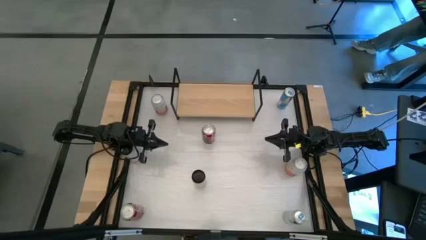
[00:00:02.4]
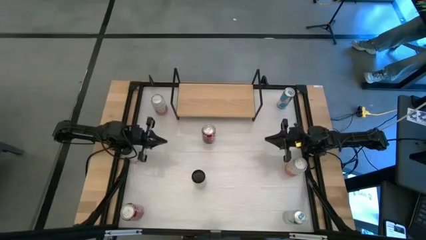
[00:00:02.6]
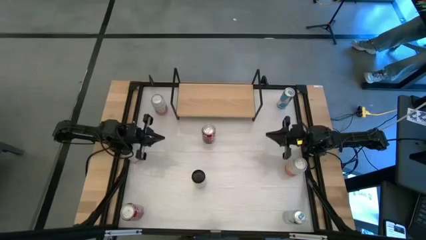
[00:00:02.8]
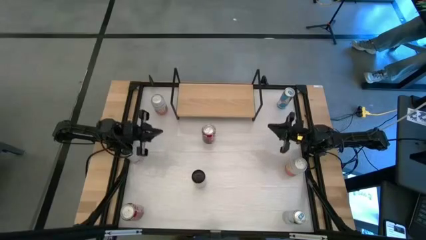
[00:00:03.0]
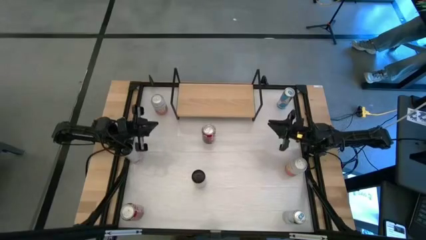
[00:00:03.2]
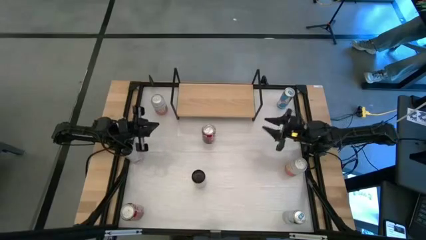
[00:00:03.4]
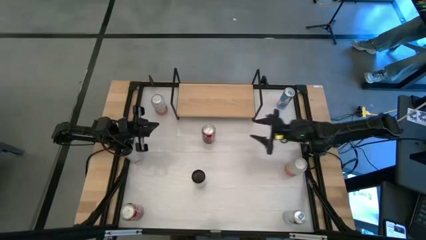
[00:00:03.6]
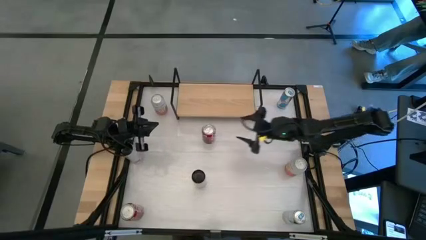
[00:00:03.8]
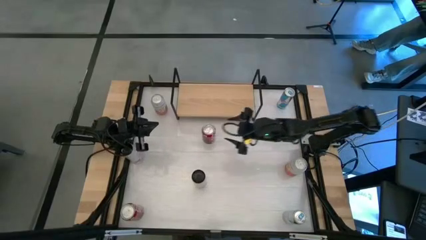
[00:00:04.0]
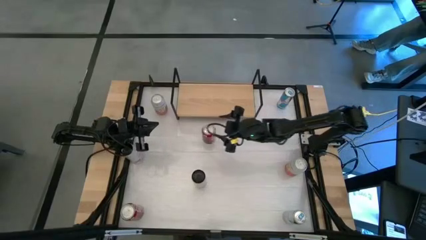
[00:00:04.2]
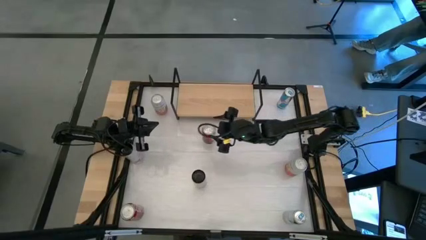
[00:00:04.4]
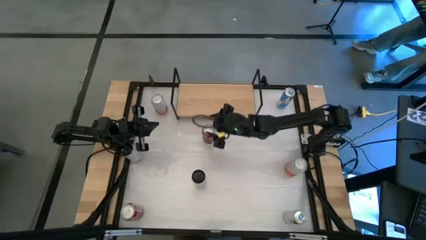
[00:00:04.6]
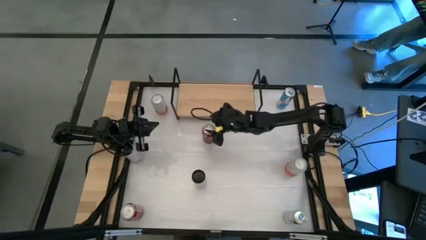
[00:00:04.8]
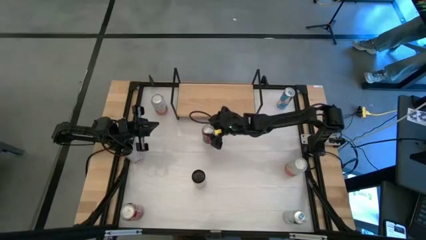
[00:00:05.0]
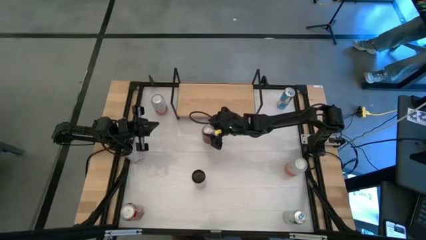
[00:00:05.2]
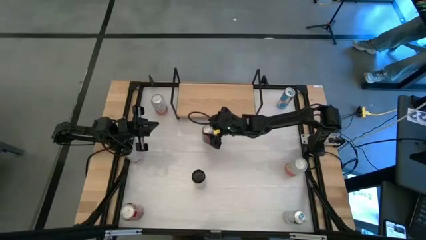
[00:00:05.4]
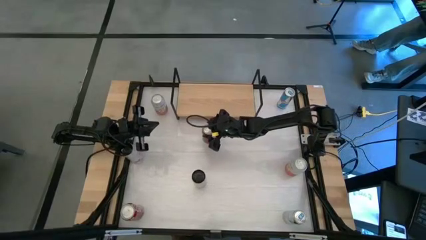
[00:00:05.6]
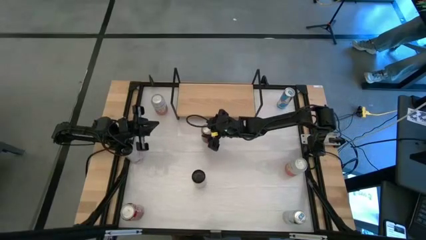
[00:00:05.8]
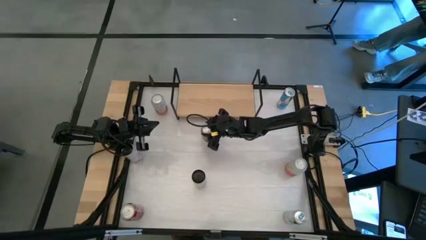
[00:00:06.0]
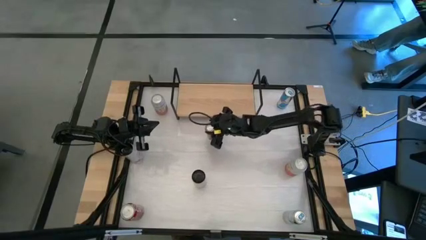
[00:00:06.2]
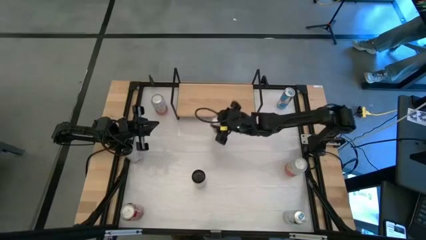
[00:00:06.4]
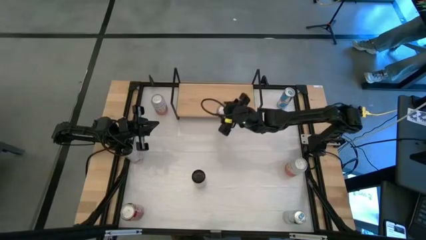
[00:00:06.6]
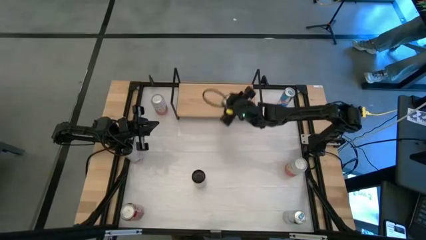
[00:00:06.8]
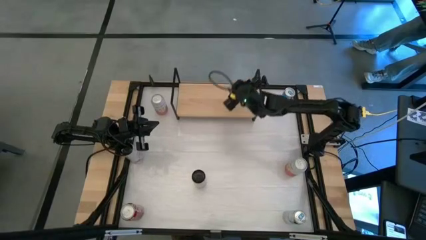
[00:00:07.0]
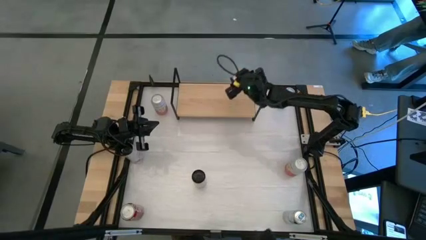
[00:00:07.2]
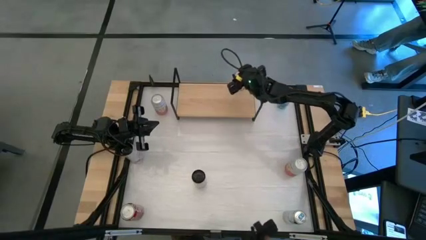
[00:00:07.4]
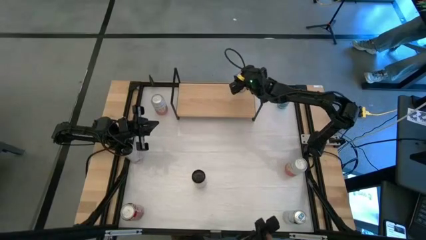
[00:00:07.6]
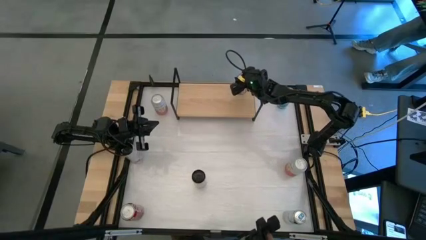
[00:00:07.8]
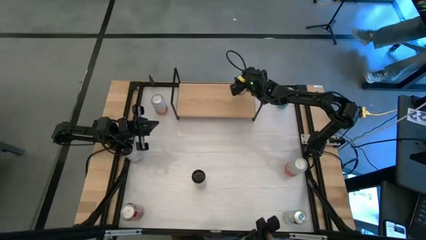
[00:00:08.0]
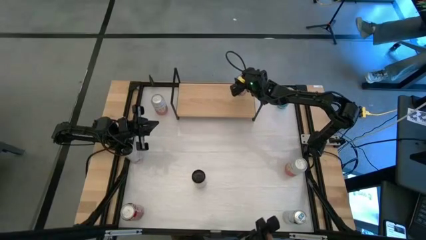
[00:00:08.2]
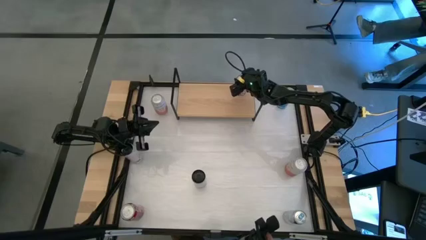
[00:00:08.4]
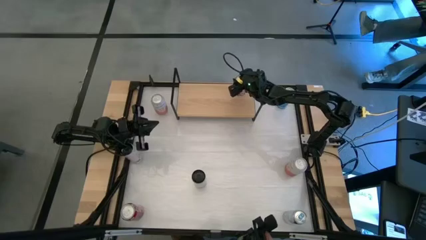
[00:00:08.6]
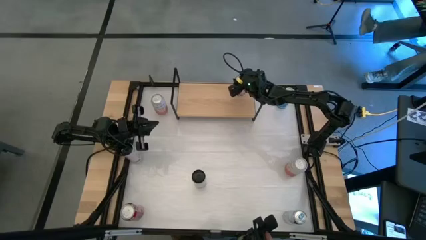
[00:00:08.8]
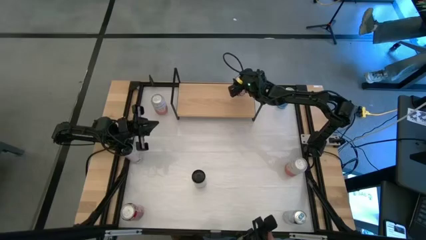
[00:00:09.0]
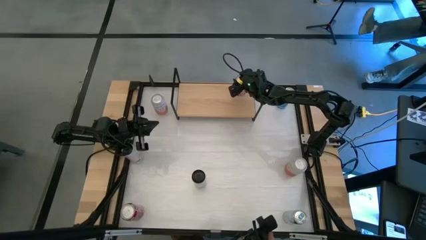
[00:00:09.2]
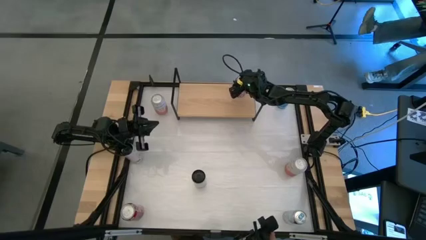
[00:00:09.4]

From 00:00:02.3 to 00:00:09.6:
Task: Place canned beverage on shelf
Put the top red soda can on the shelf

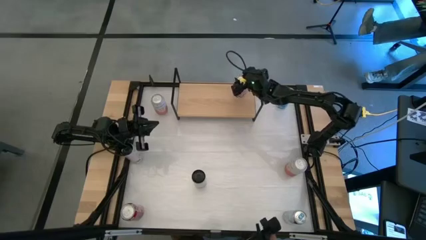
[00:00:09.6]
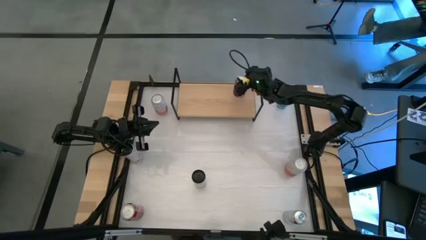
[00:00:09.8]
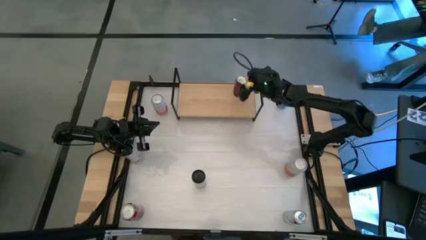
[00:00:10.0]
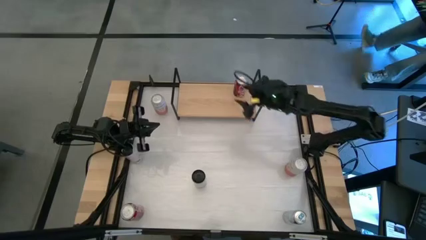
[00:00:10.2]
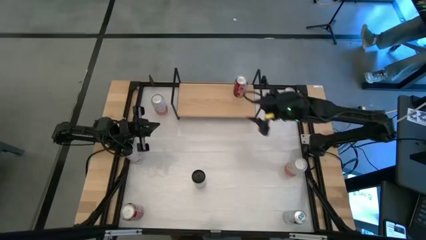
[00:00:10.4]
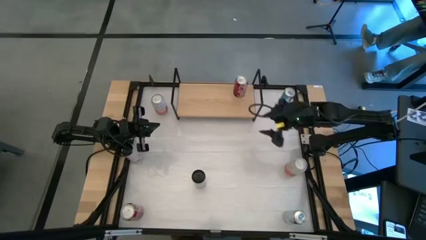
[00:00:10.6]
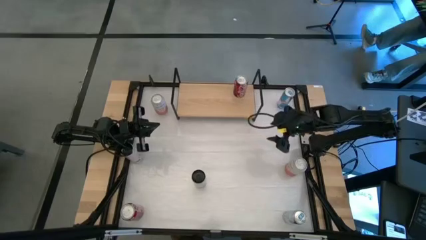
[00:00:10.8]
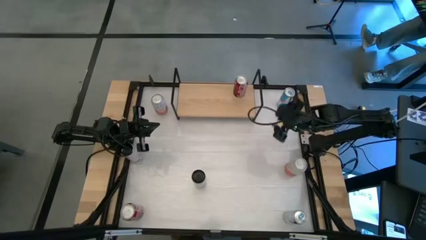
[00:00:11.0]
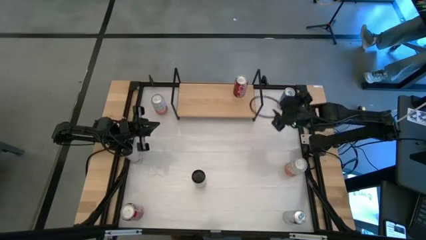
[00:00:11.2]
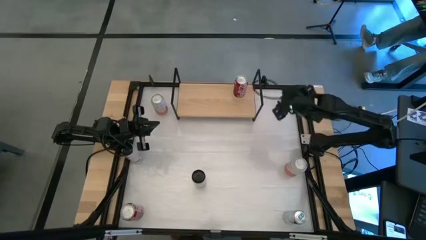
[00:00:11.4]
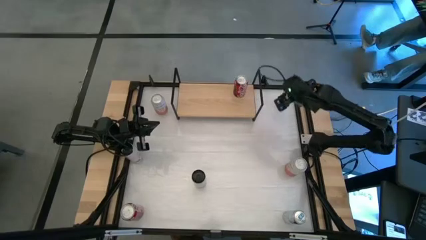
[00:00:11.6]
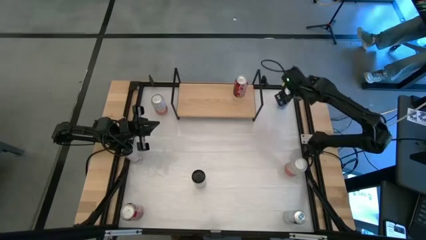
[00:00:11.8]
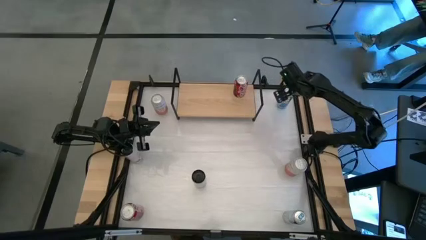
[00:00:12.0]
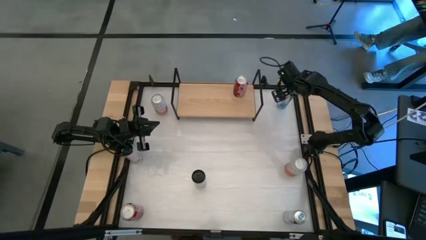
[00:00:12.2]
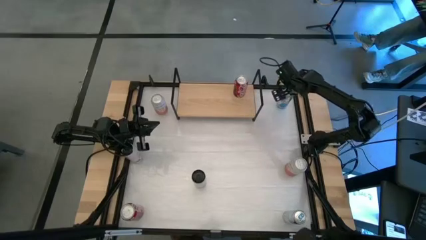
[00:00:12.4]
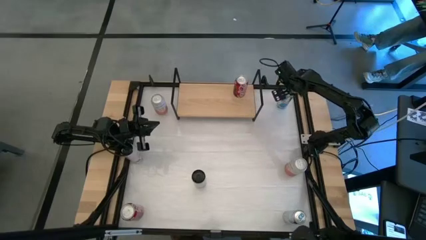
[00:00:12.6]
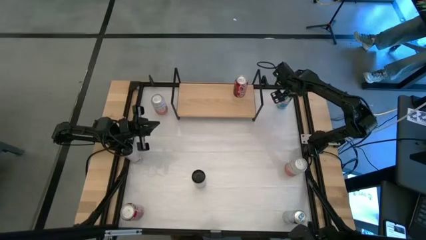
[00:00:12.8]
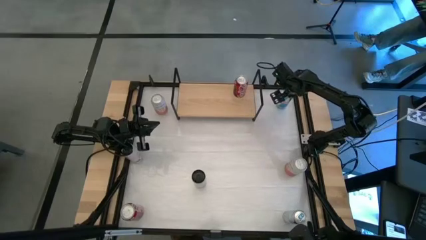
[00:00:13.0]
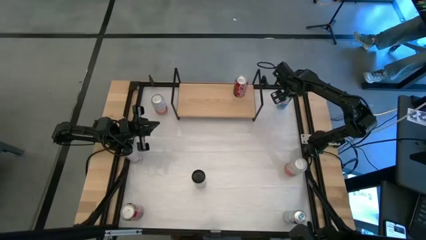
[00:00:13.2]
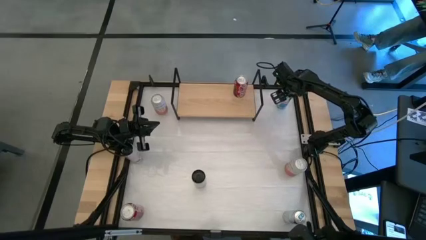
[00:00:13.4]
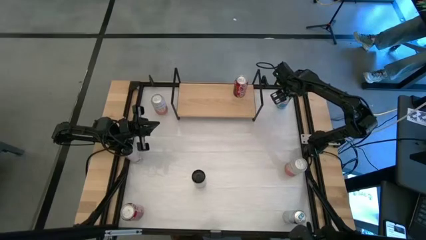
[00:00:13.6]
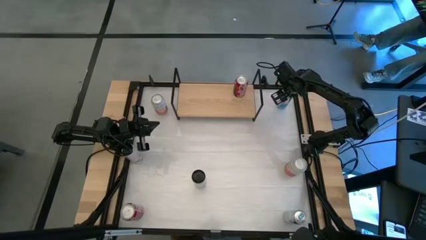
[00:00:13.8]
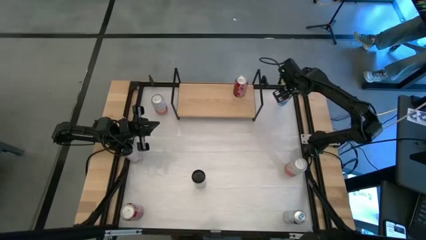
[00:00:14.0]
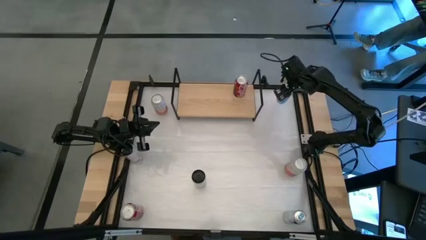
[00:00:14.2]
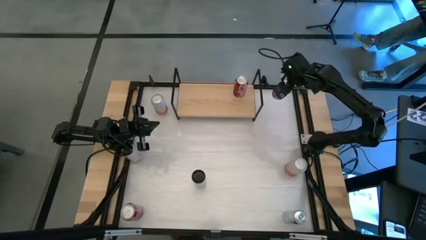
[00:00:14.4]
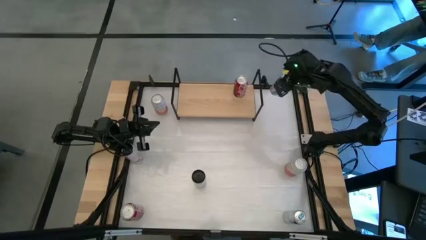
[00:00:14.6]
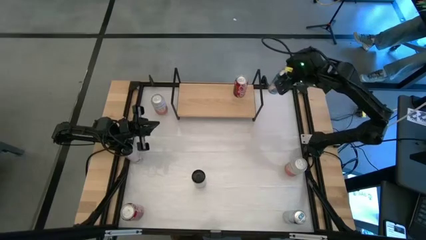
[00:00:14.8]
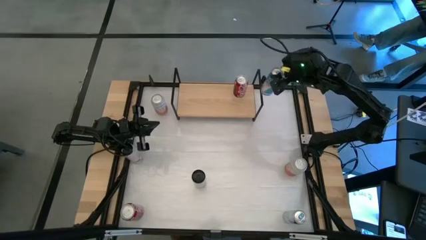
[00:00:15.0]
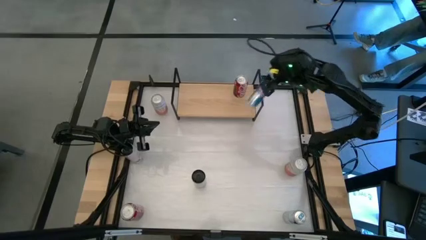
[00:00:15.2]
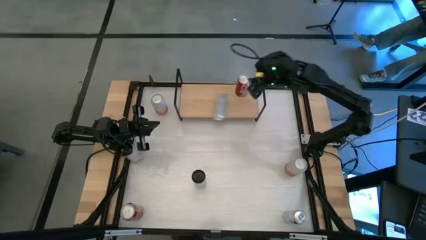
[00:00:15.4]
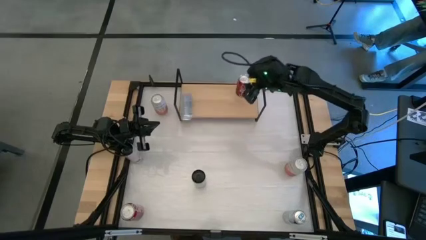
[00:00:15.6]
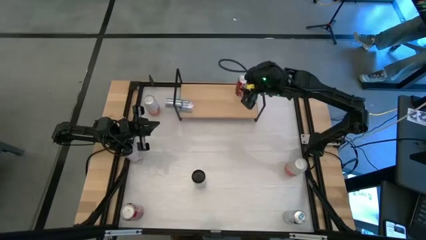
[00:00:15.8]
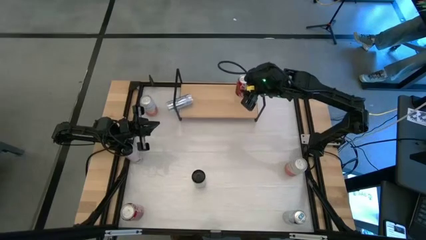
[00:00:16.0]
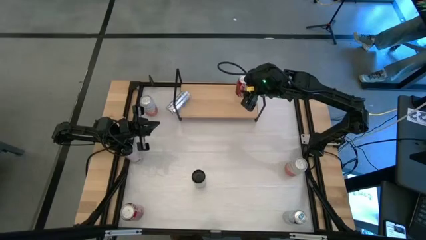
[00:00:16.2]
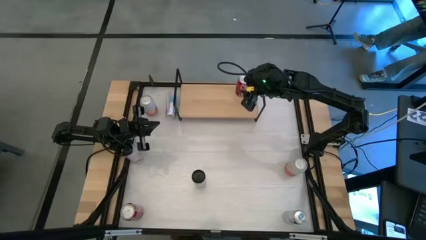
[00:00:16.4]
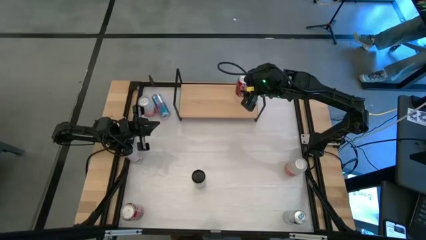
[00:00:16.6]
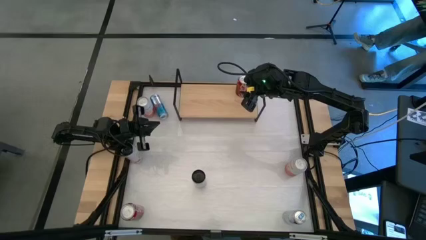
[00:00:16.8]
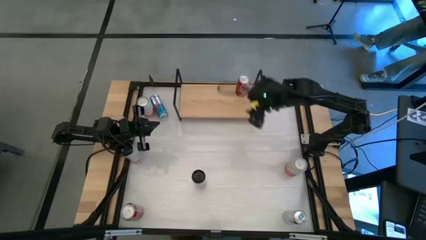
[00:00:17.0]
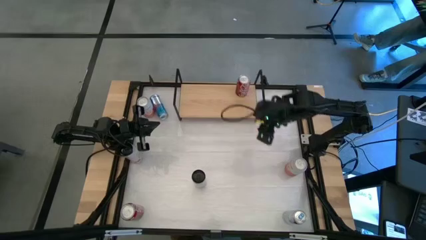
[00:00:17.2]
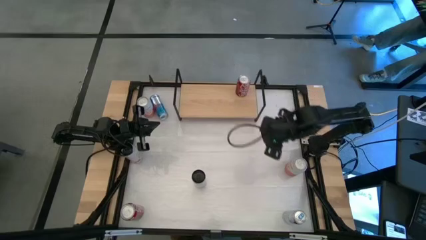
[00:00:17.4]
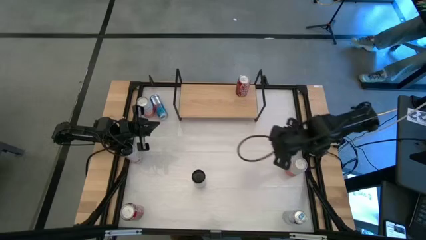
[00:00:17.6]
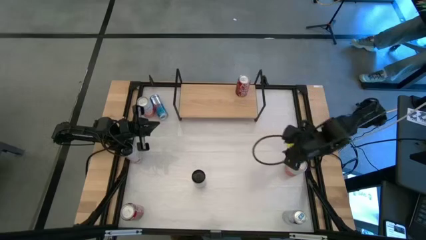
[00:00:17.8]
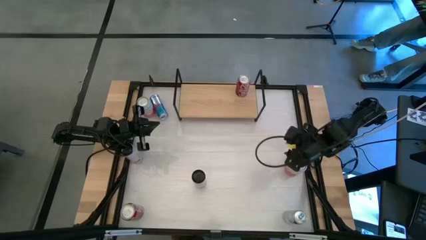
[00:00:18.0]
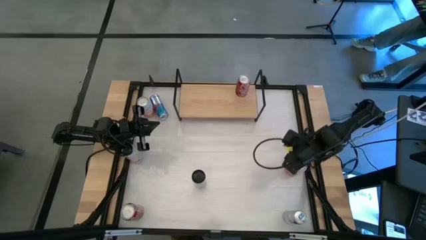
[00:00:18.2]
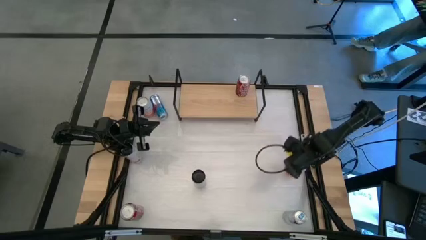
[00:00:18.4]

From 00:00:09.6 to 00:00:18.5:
Put the top blue soda can on the shelf
